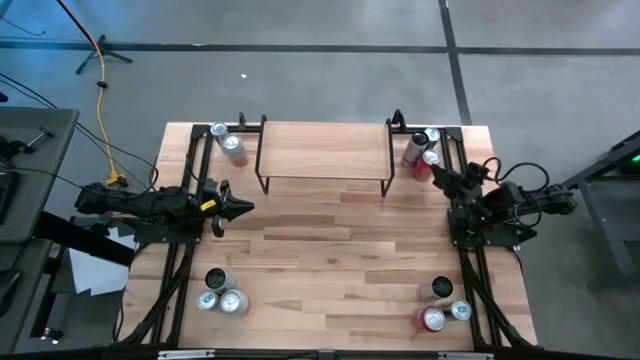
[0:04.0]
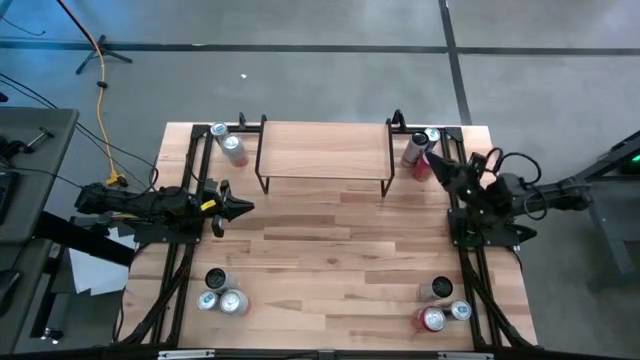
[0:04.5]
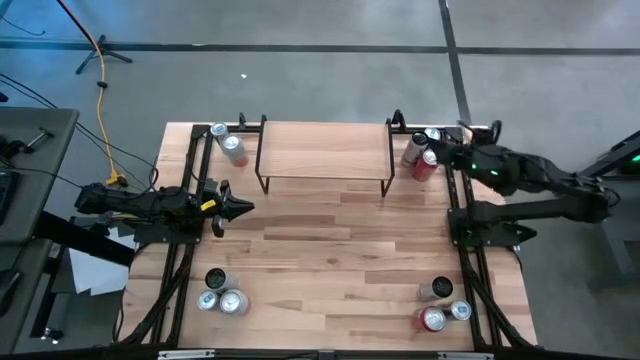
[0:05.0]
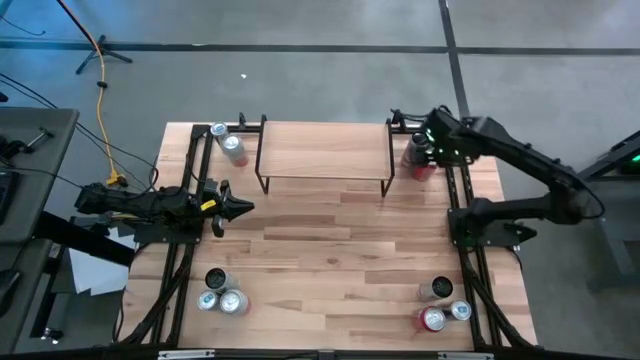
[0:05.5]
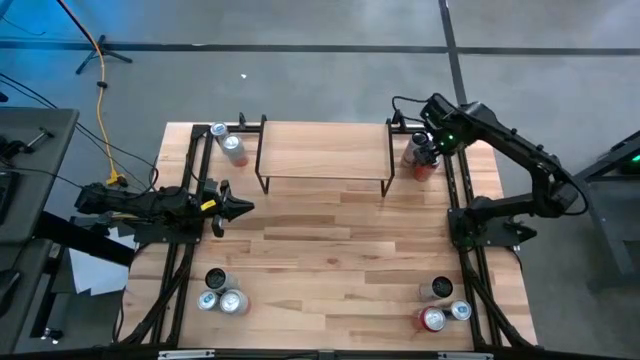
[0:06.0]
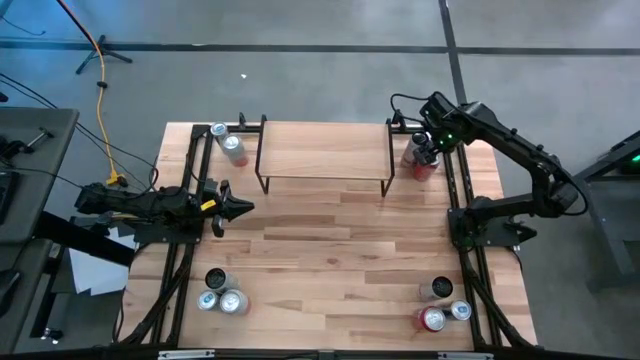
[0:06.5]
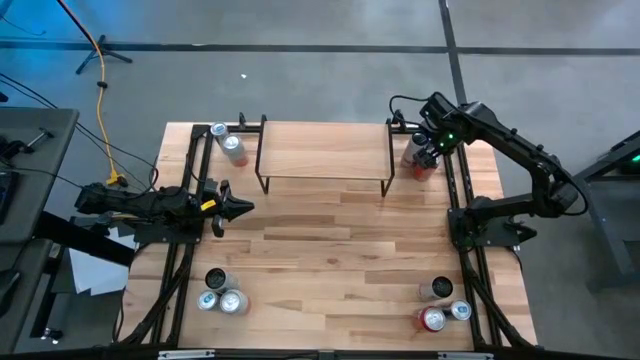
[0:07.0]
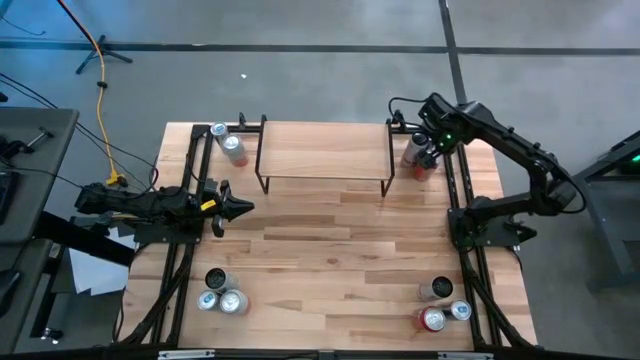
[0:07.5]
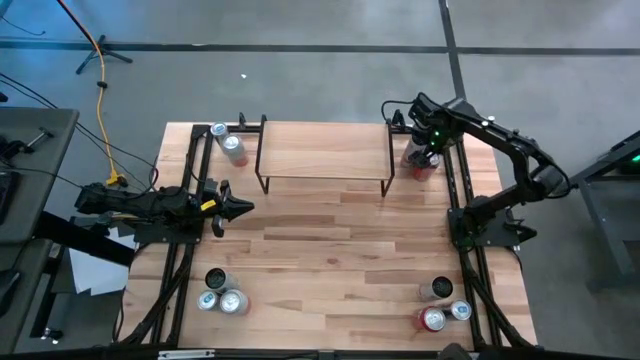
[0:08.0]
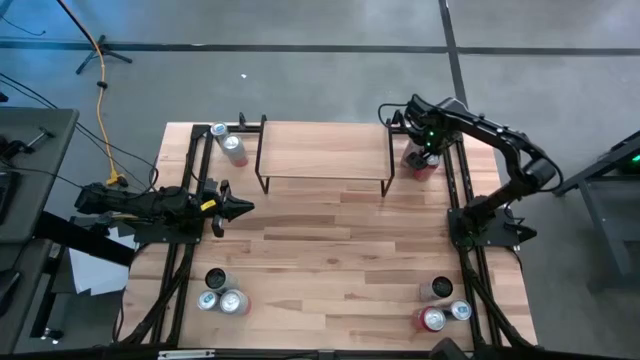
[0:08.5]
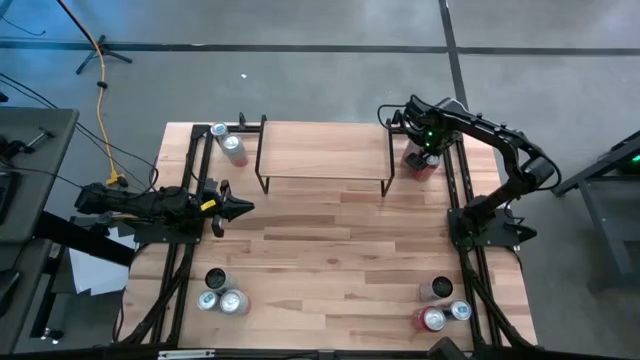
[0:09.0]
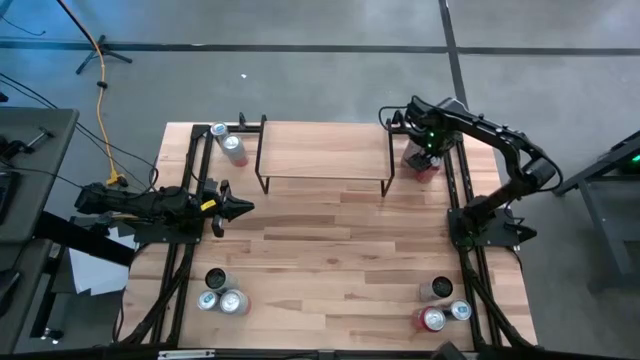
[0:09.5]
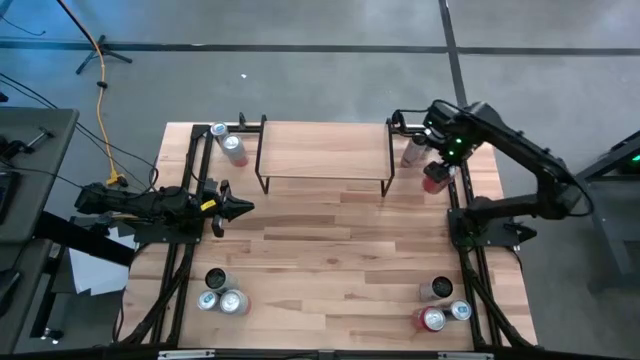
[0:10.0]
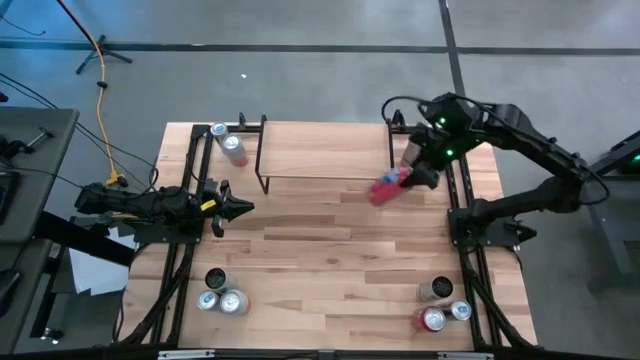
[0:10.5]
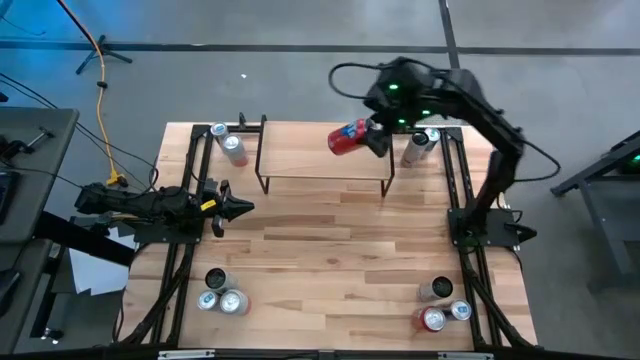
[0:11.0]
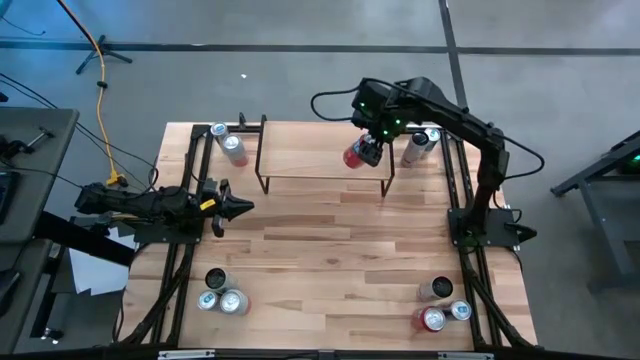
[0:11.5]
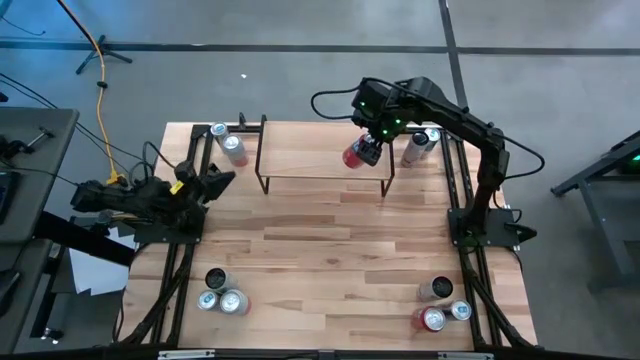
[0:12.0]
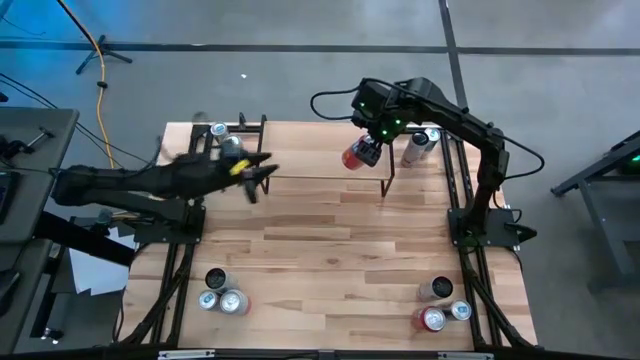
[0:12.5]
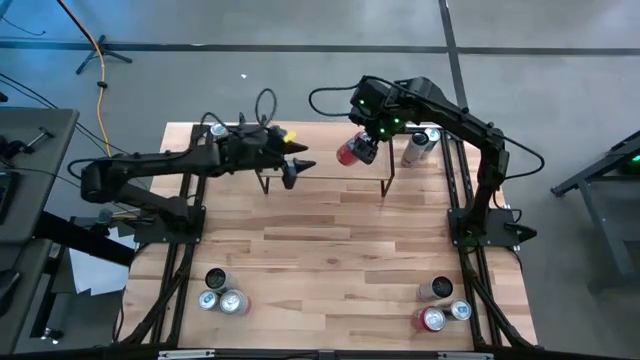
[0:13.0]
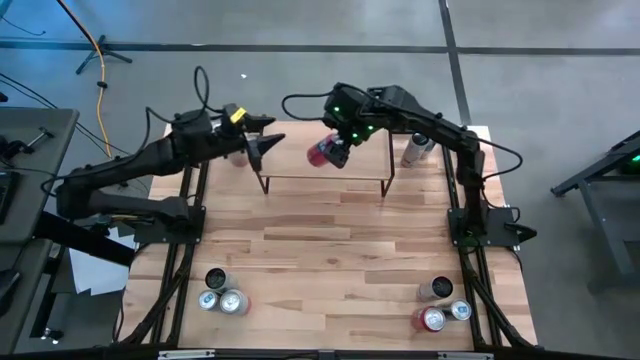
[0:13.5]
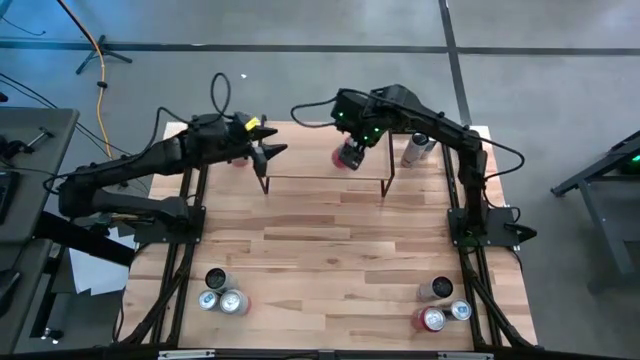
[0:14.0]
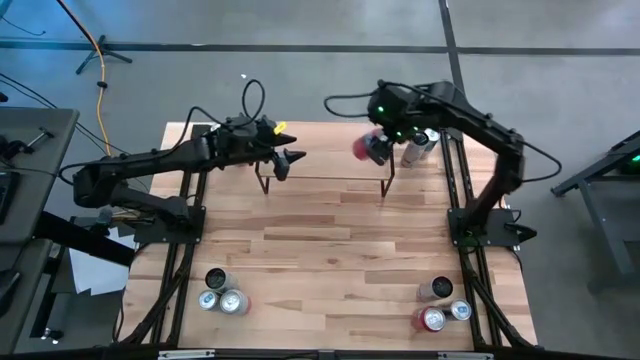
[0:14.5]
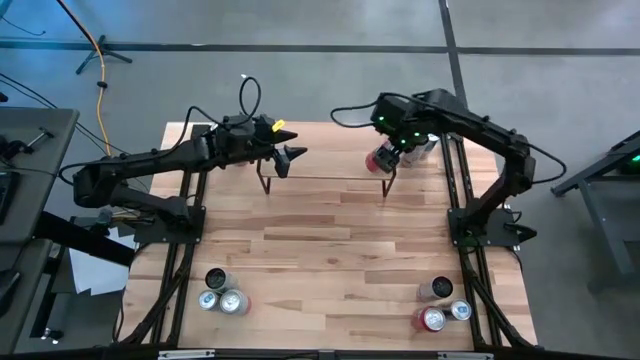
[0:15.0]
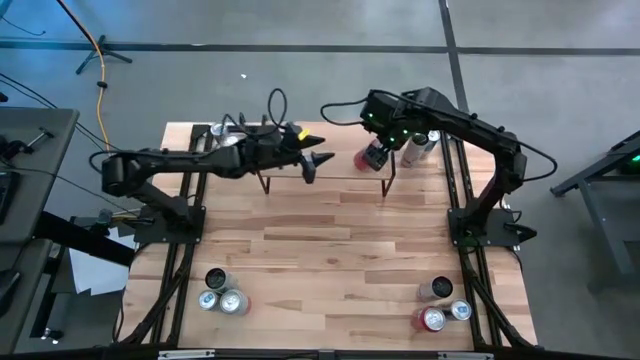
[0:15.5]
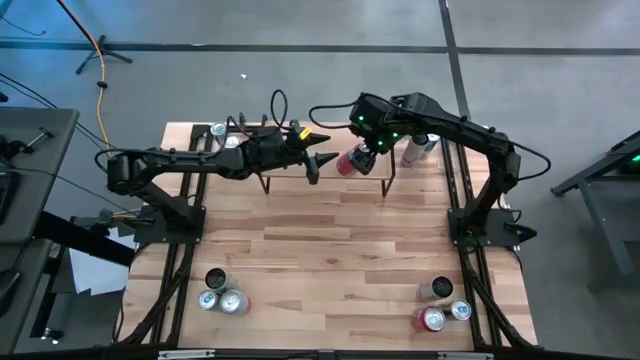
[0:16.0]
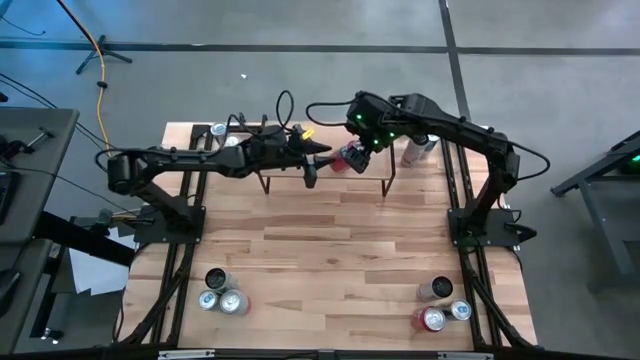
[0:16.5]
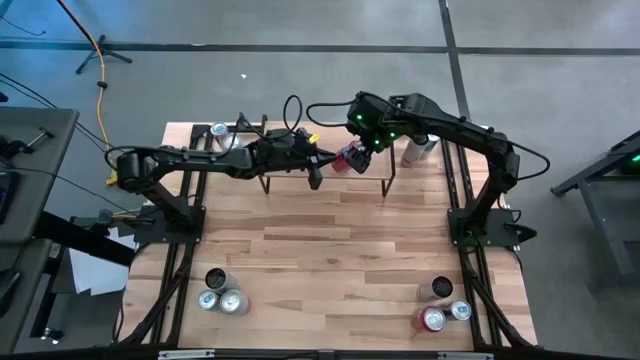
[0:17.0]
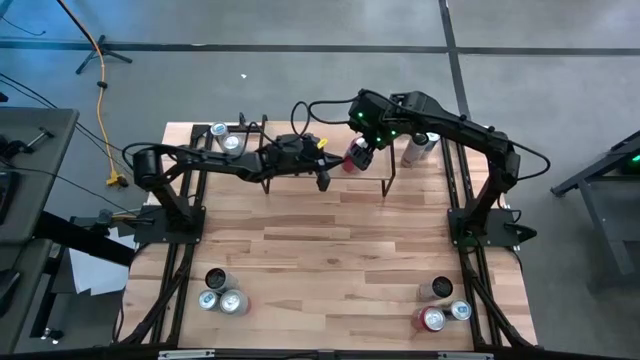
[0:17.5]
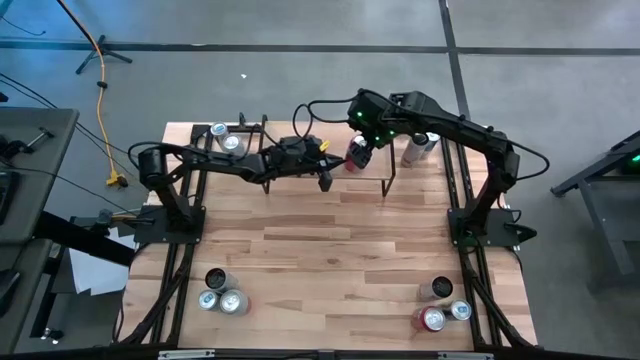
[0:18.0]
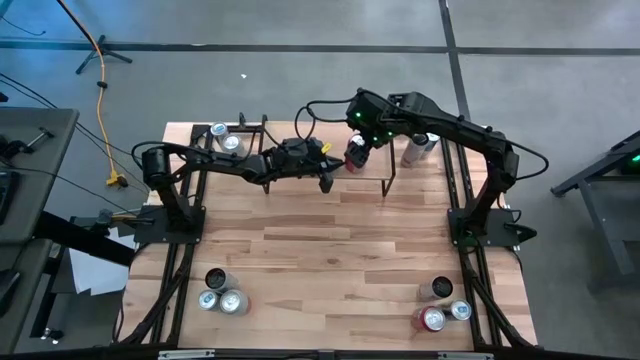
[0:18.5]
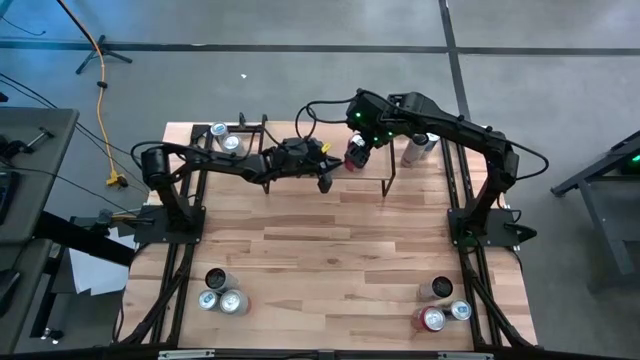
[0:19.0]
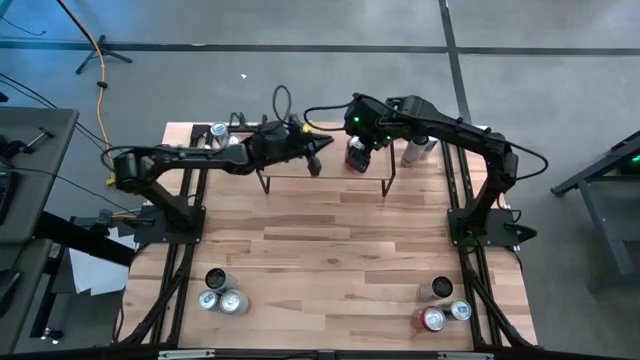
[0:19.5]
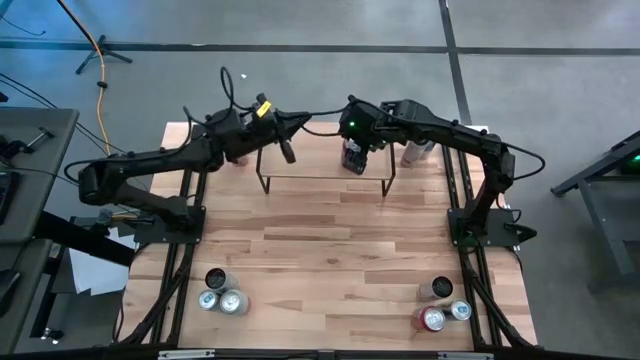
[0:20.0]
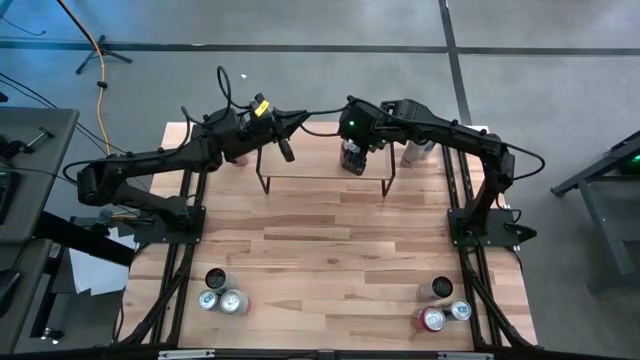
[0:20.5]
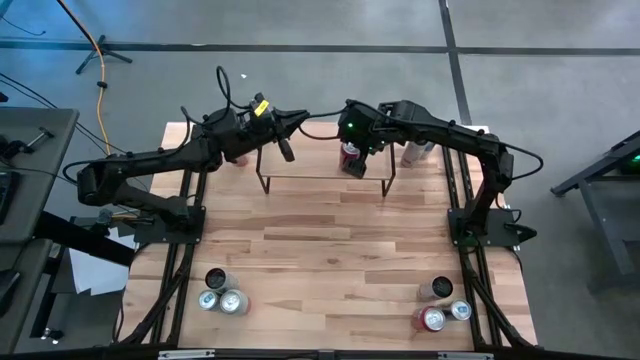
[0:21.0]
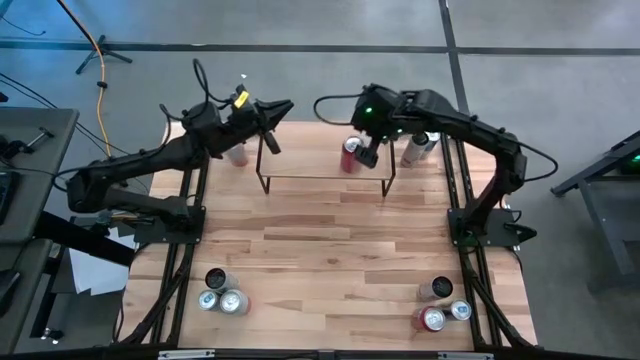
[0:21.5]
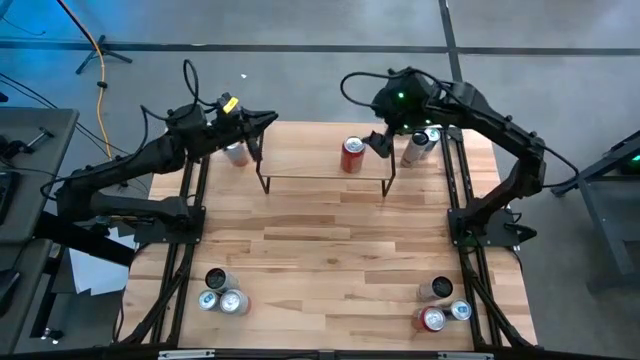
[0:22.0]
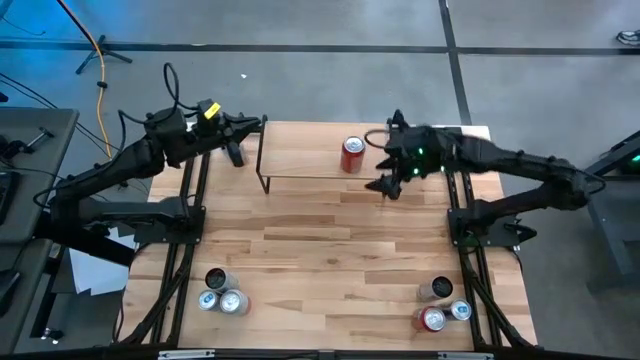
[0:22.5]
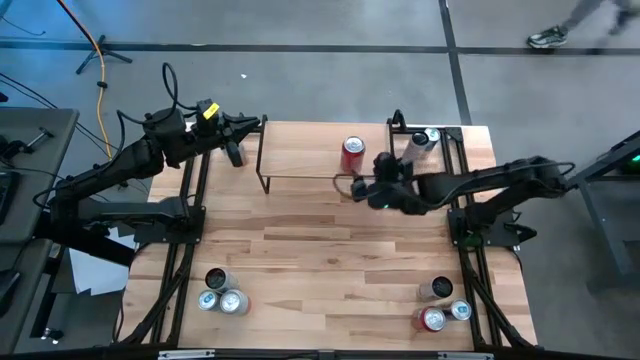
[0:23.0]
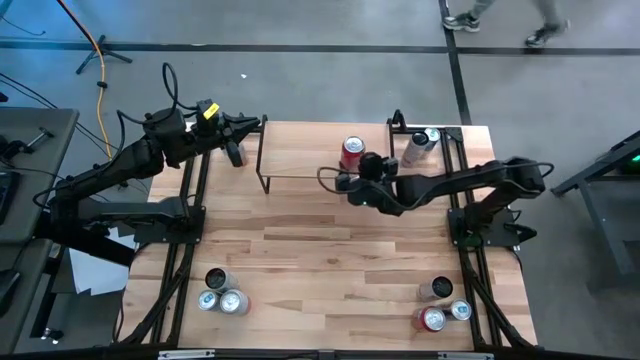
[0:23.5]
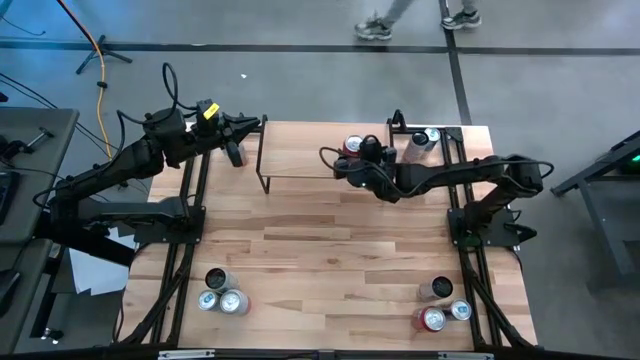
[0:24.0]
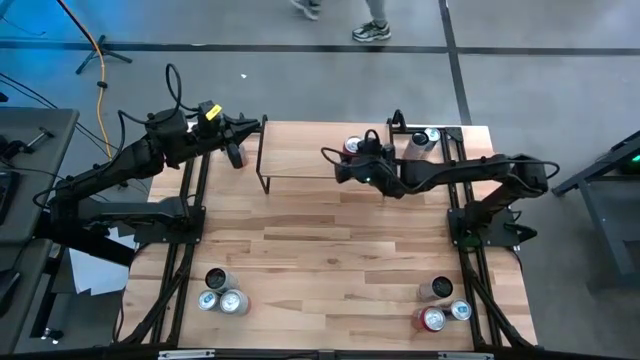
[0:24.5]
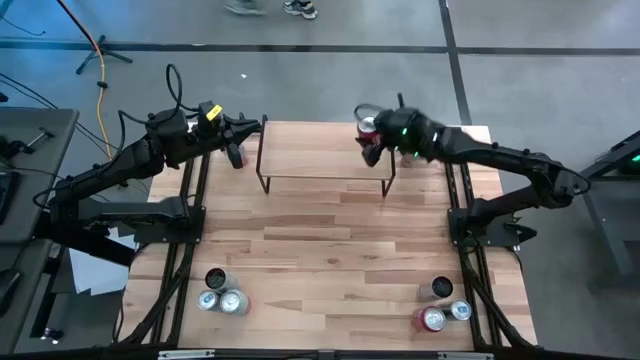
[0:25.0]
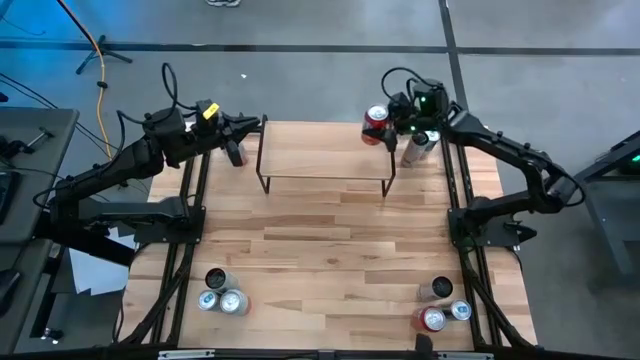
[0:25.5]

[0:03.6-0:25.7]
Task: Place canned beverage on shelf
Put the top red soda can on the shelf
